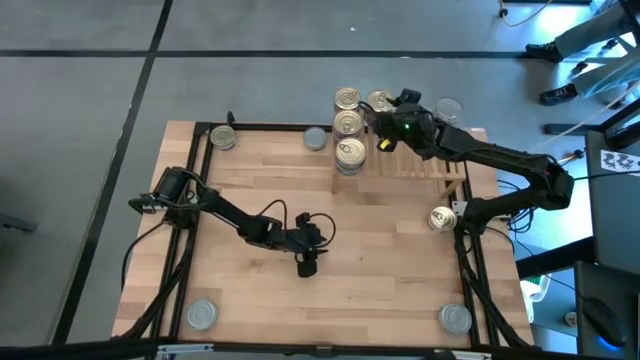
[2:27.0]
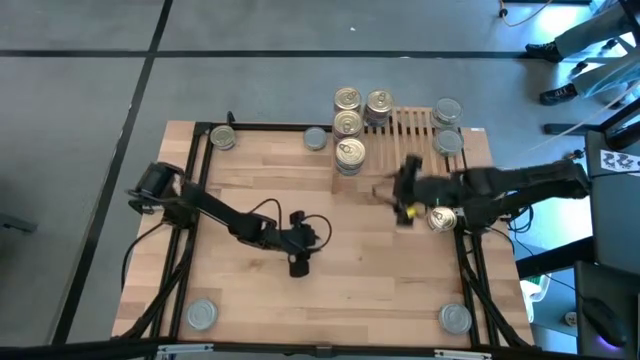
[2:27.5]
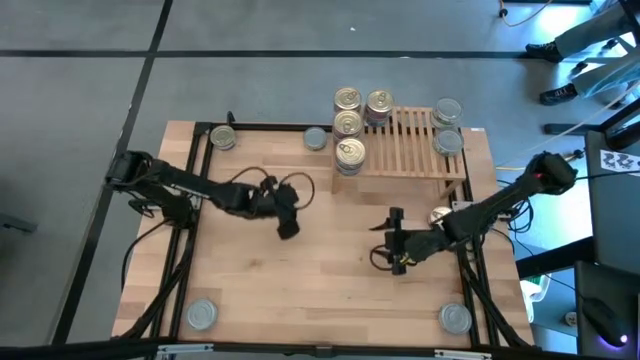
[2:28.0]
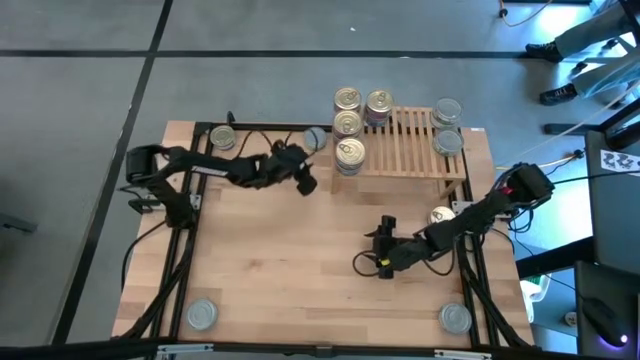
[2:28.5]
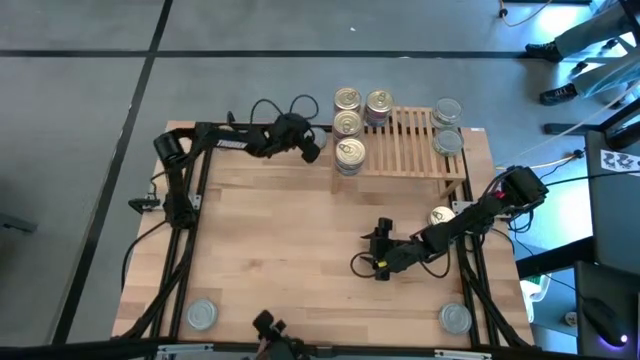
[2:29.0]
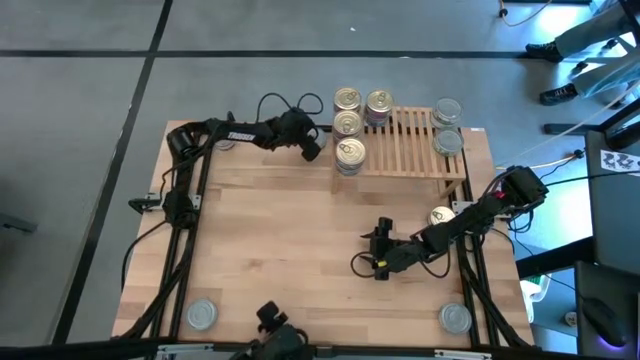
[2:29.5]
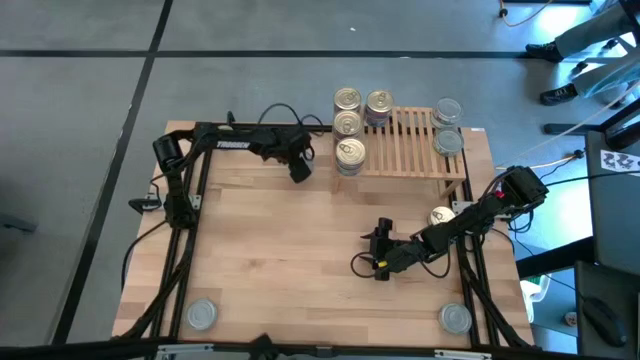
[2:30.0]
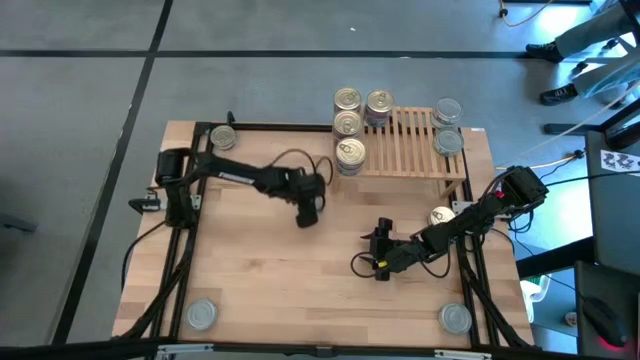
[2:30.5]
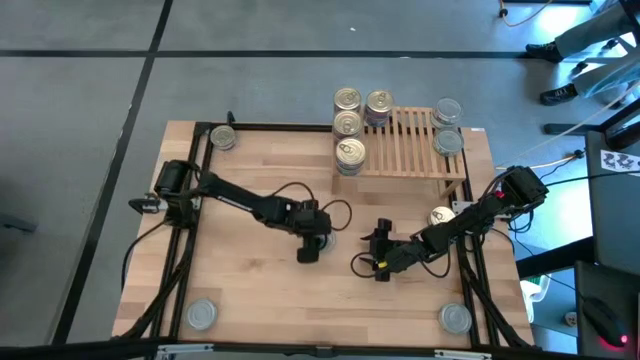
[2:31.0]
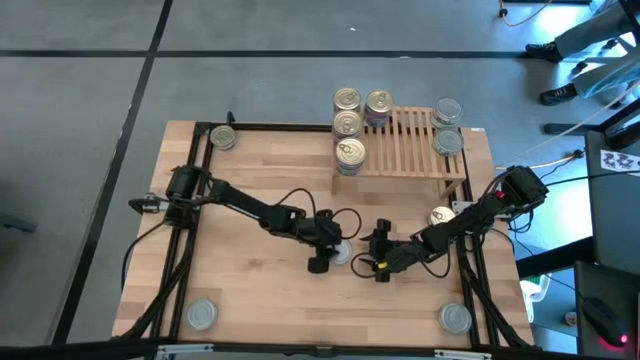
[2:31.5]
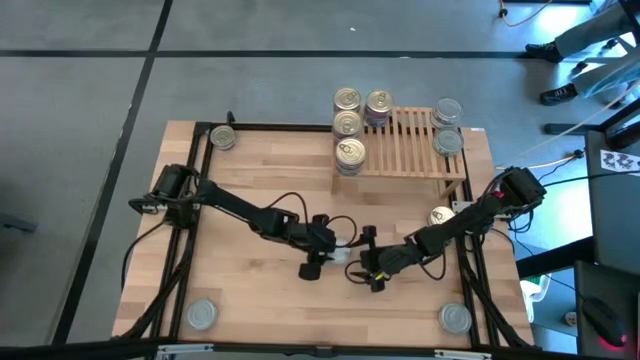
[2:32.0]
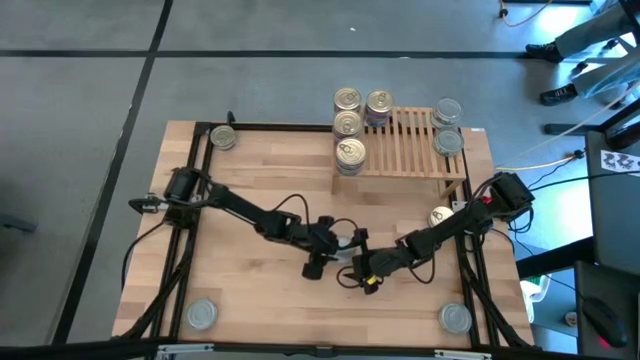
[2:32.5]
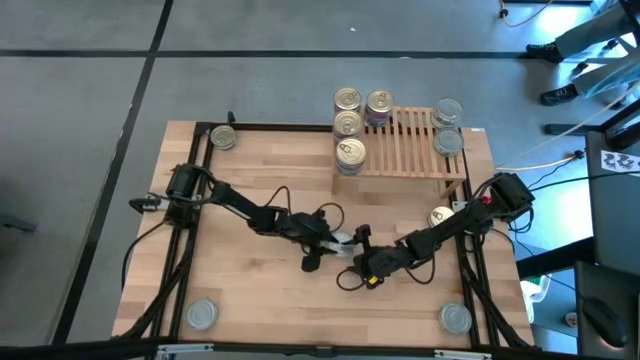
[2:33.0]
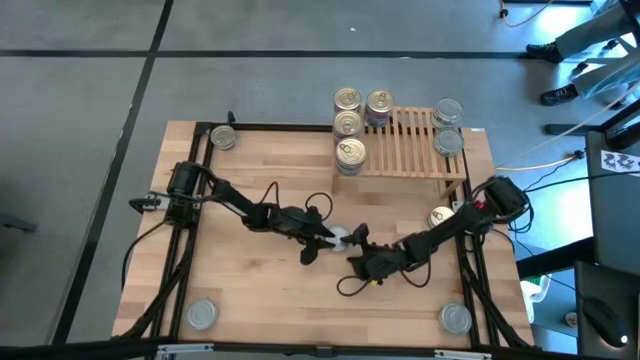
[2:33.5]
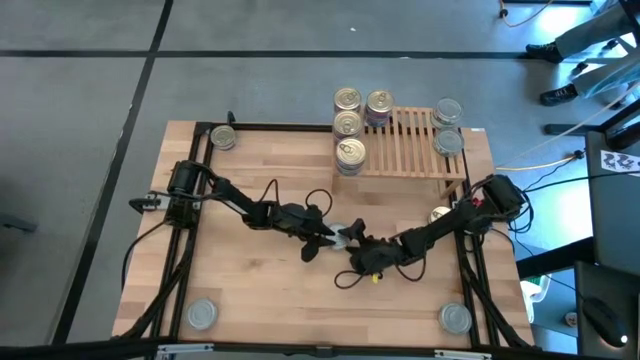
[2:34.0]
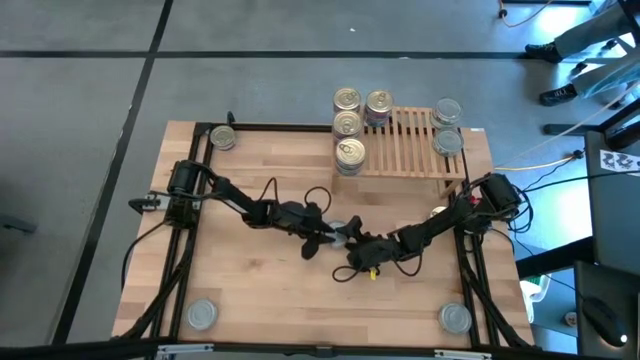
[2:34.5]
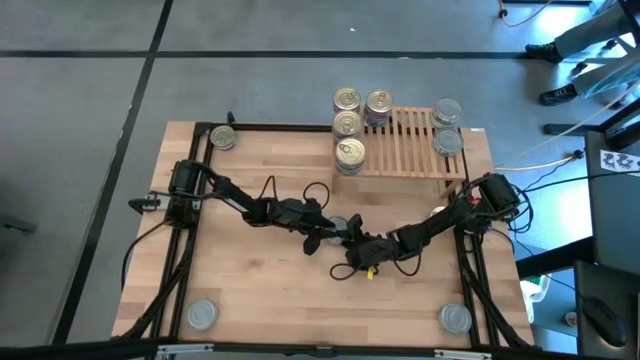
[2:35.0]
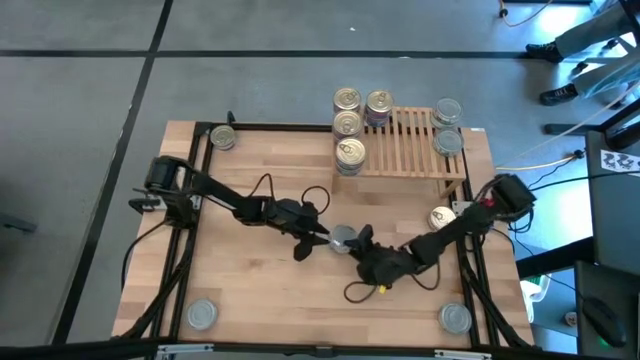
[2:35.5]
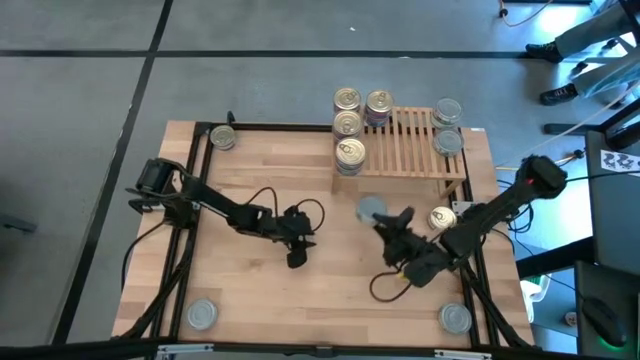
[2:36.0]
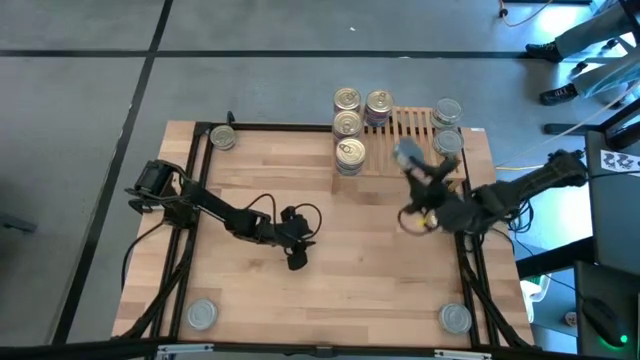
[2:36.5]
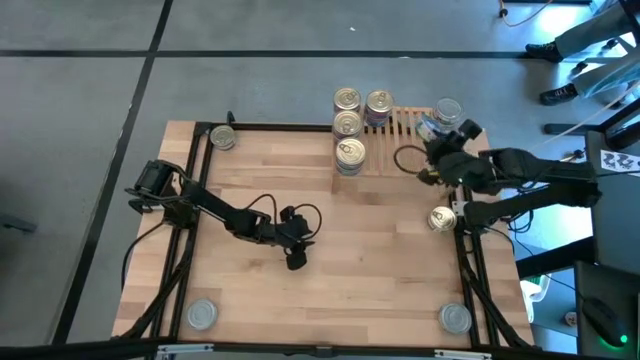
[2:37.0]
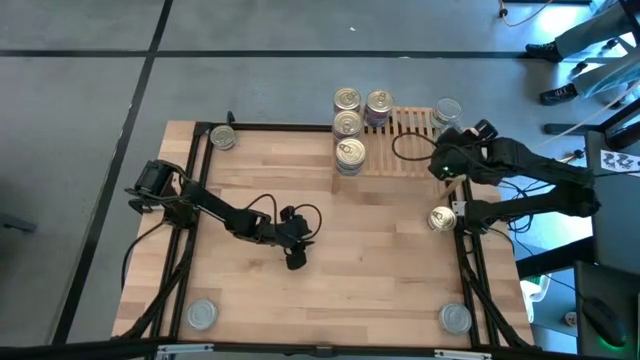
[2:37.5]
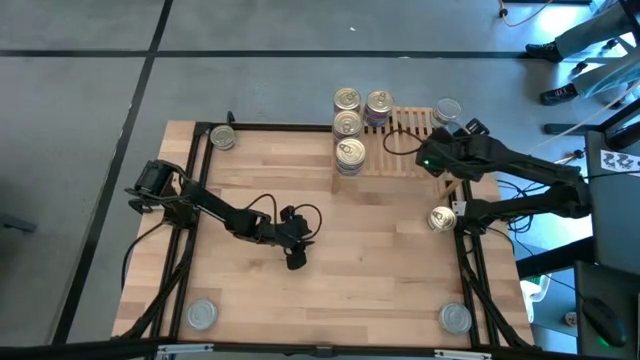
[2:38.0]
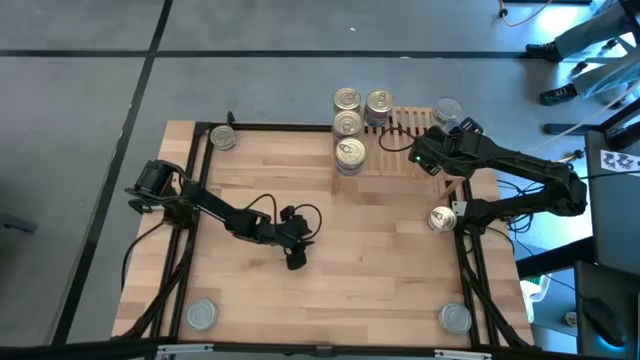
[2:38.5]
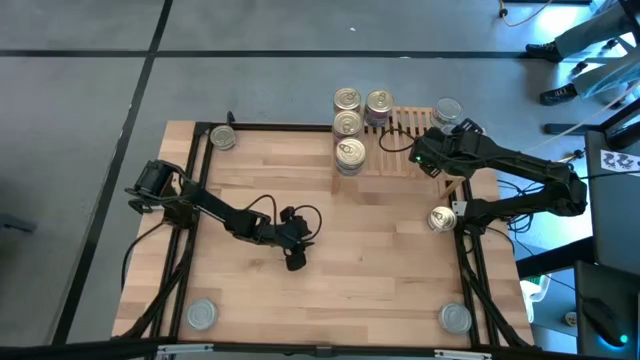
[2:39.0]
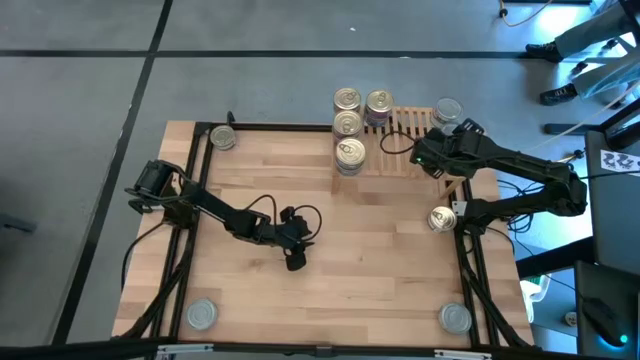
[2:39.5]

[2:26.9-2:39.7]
Task: Stack canned seafood by type on shelf
Stack the green tuna can on top of the green tuna can on the shelf

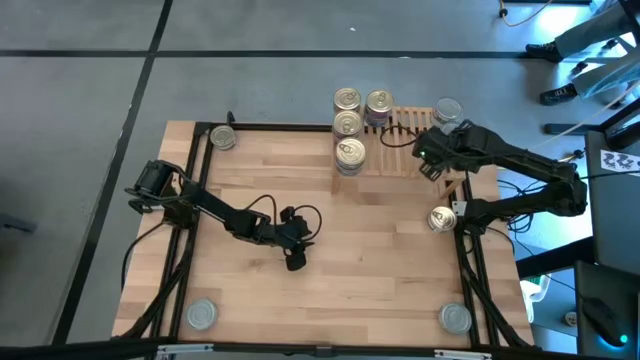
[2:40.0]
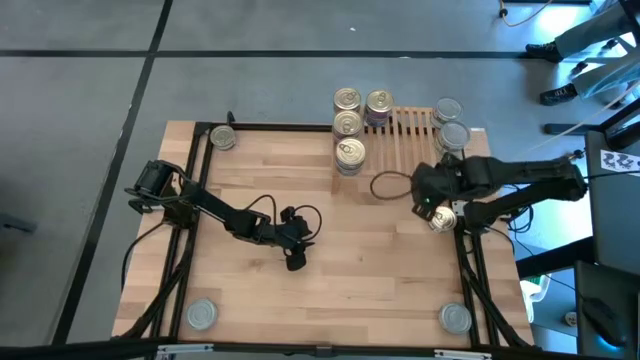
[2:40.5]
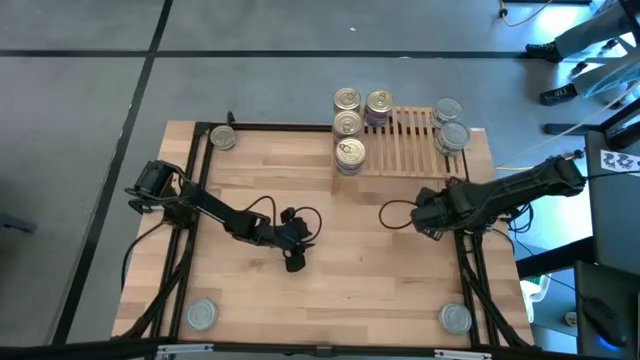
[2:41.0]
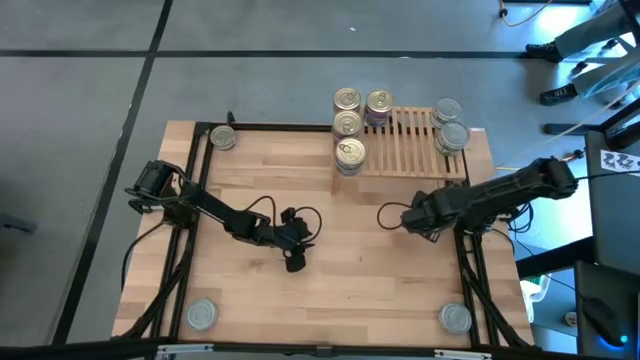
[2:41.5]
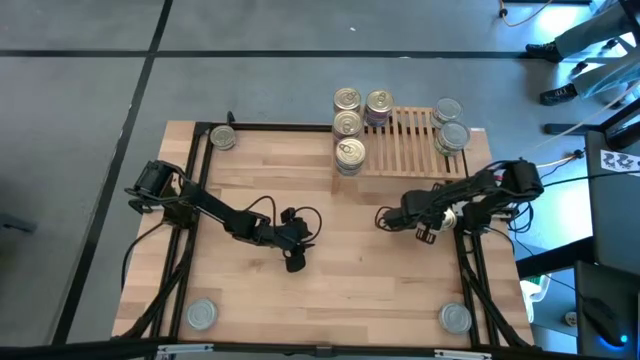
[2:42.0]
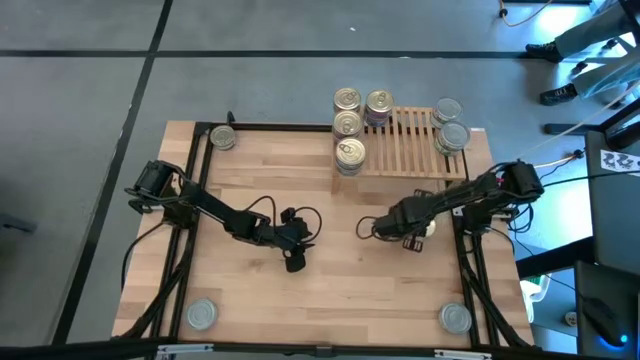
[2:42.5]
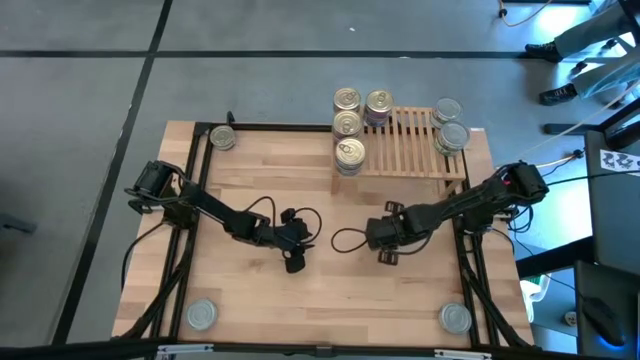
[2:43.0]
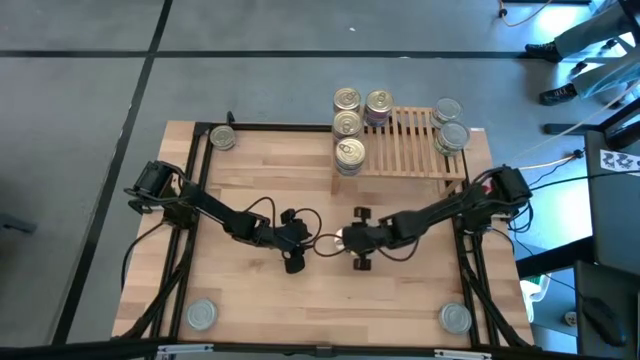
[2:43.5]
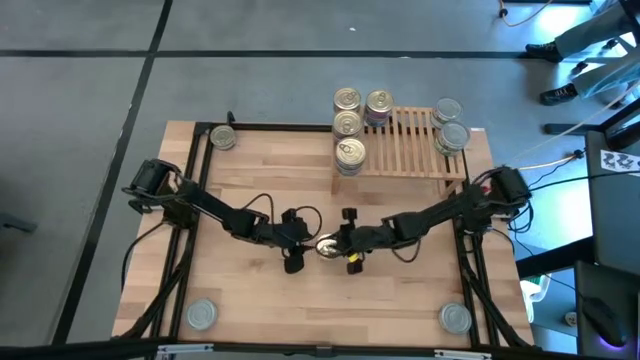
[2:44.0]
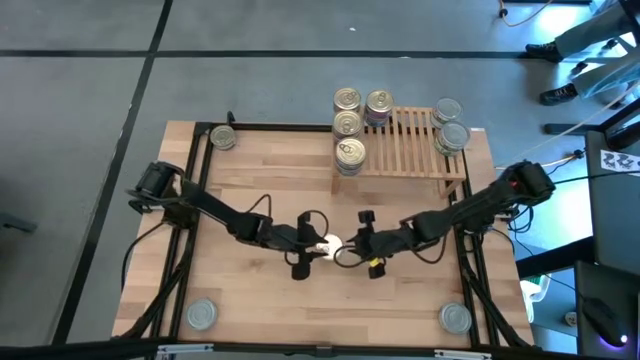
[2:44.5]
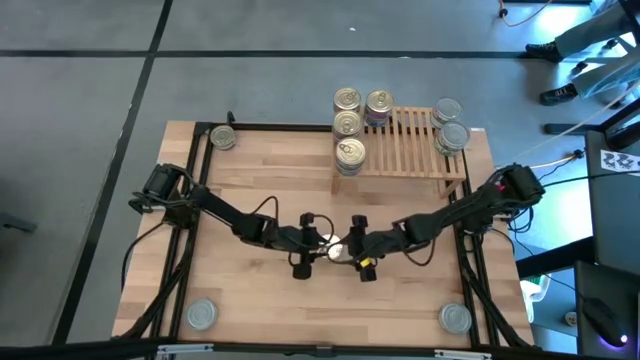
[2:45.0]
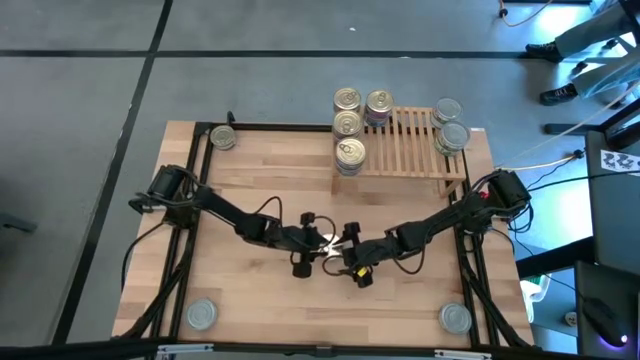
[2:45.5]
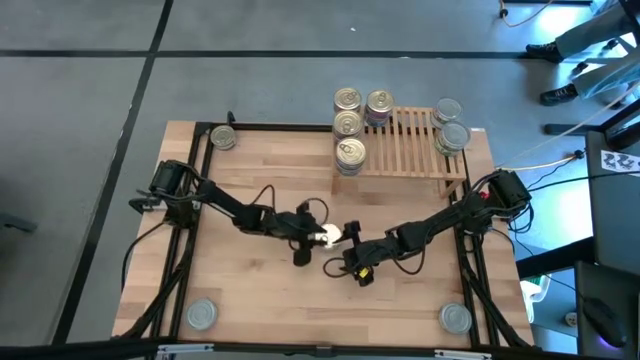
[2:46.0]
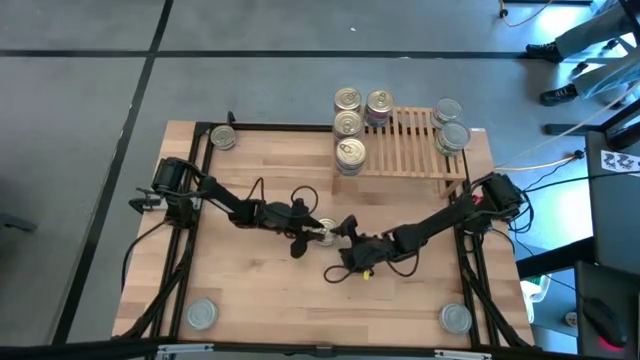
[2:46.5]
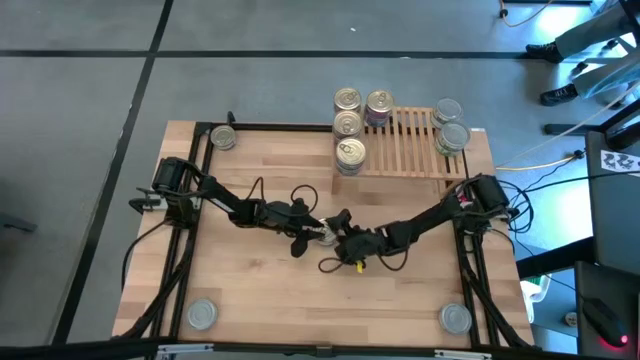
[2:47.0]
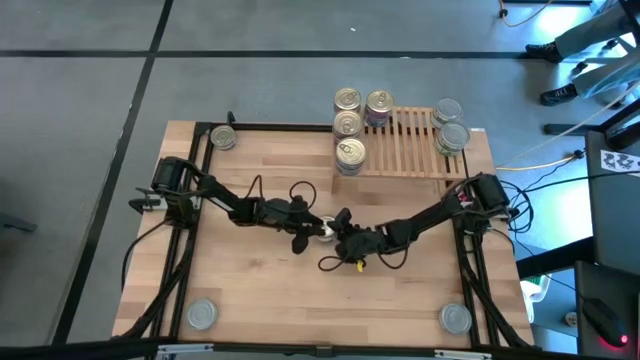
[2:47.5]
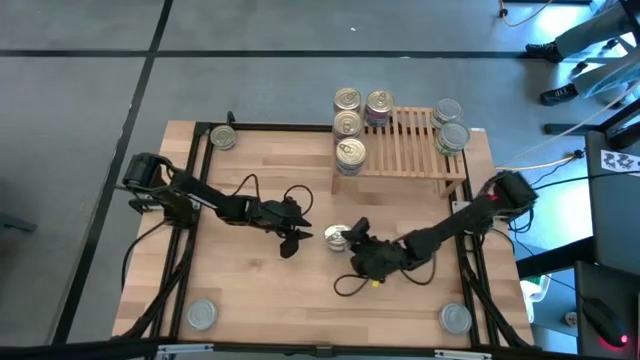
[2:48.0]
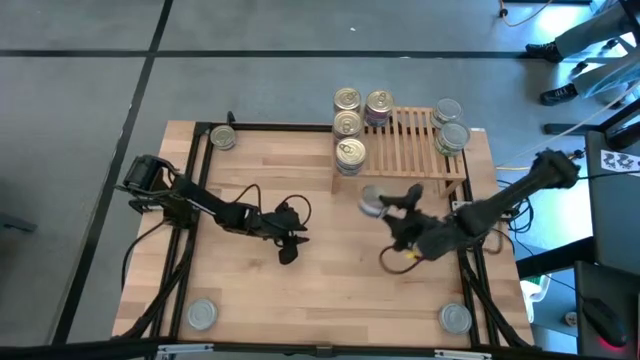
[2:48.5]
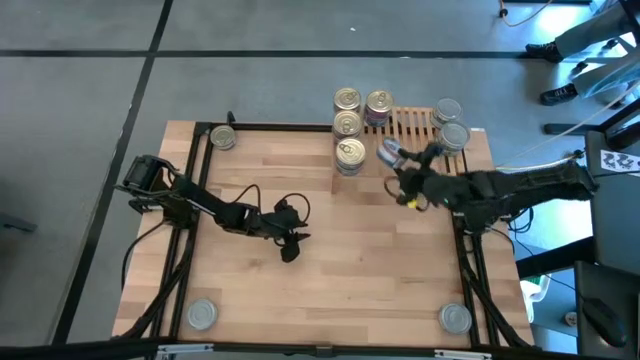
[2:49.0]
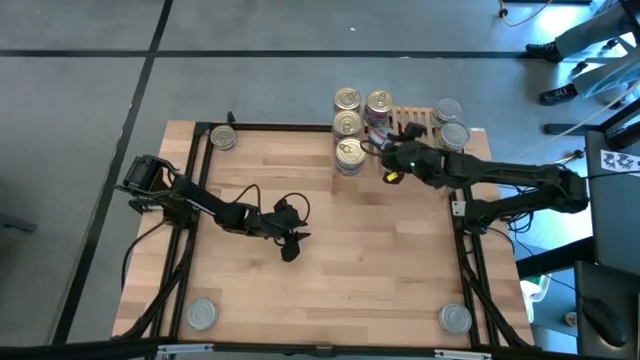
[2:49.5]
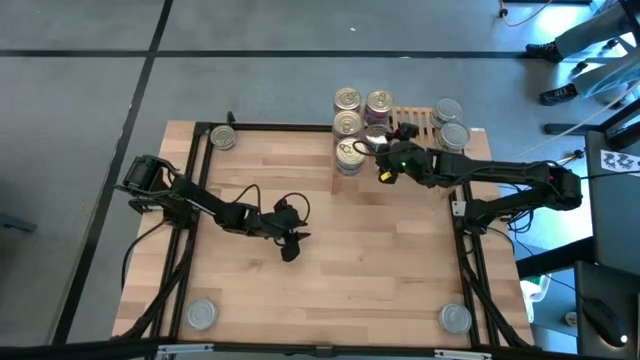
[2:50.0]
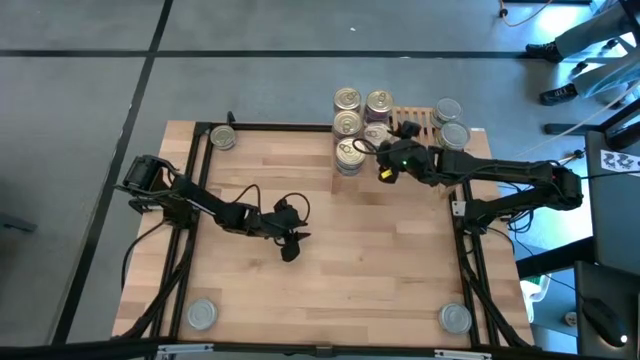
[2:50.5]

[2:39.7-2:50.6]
Put the blue-pink tuna can on the shelf aligned with the other blue-pink tuna can
